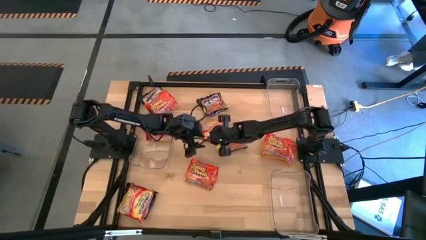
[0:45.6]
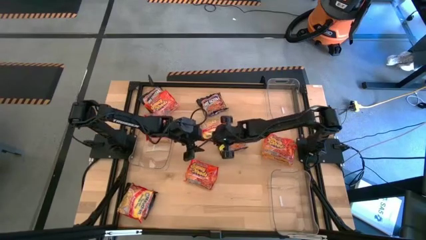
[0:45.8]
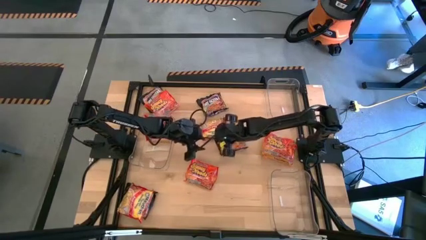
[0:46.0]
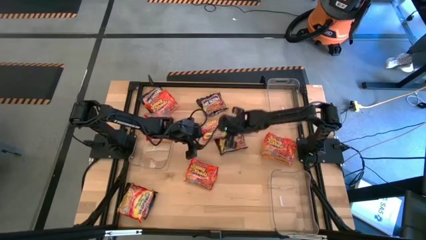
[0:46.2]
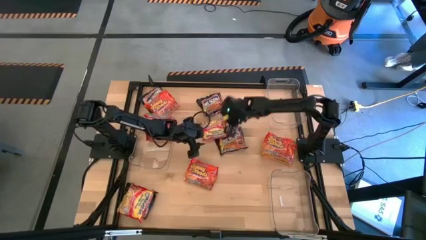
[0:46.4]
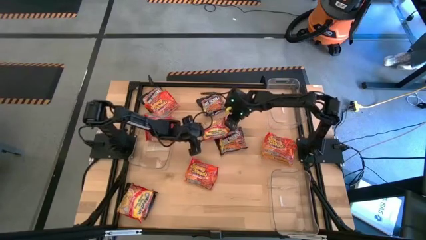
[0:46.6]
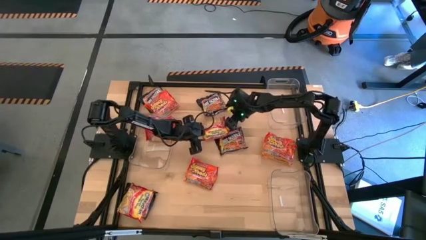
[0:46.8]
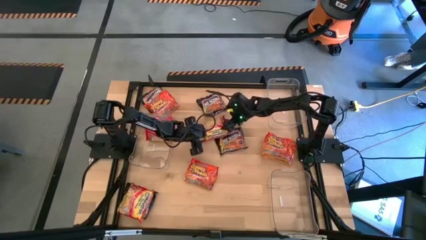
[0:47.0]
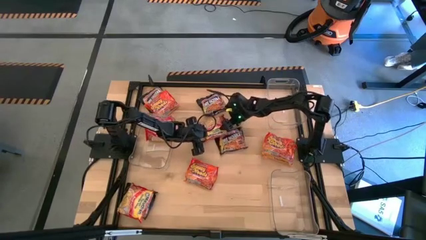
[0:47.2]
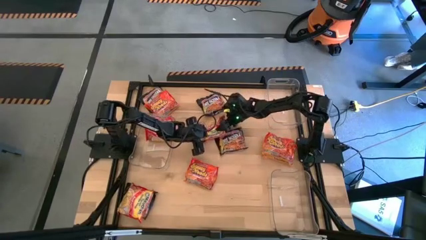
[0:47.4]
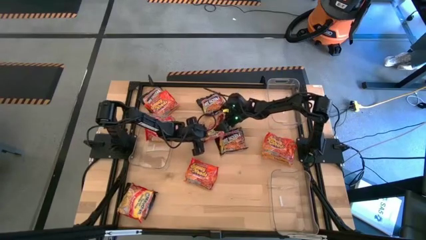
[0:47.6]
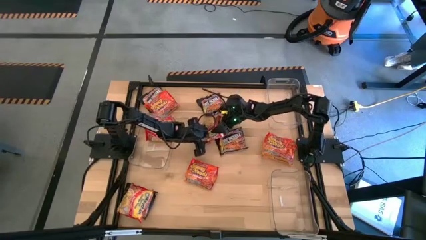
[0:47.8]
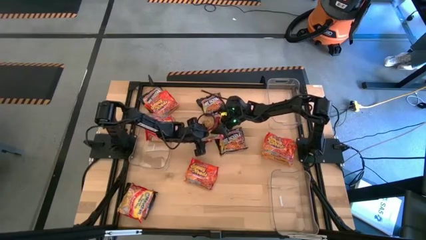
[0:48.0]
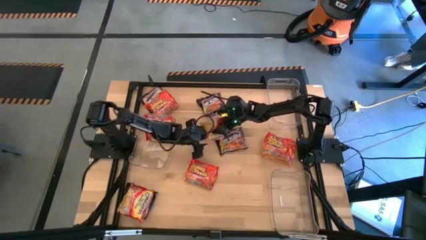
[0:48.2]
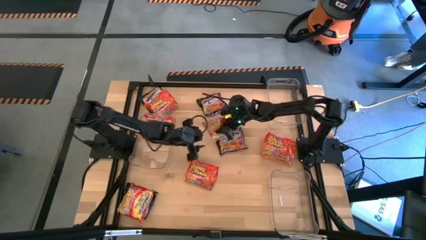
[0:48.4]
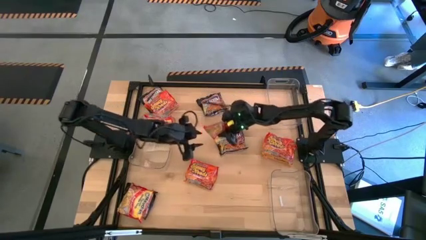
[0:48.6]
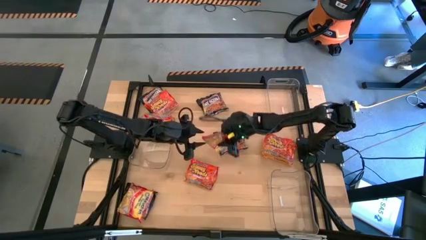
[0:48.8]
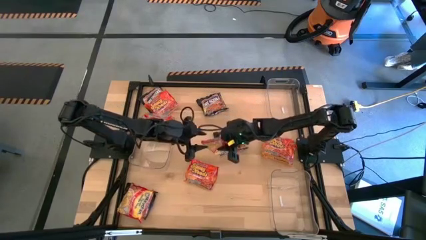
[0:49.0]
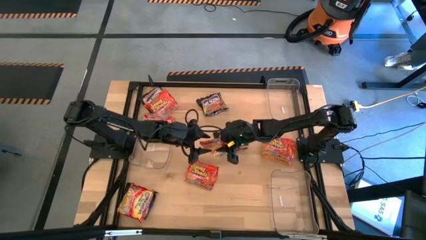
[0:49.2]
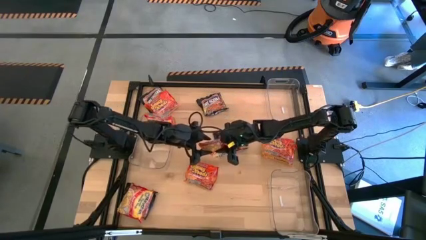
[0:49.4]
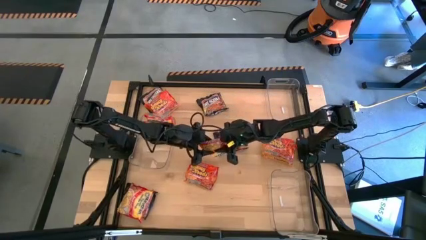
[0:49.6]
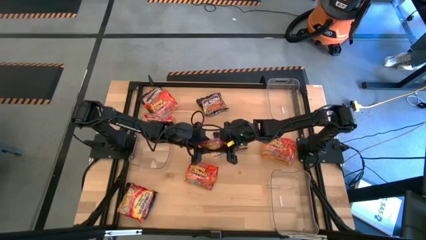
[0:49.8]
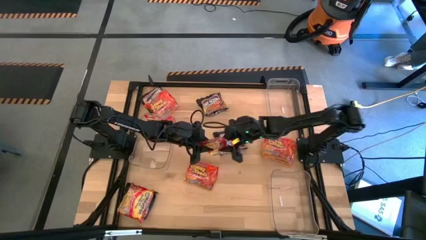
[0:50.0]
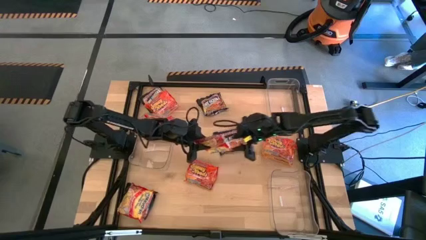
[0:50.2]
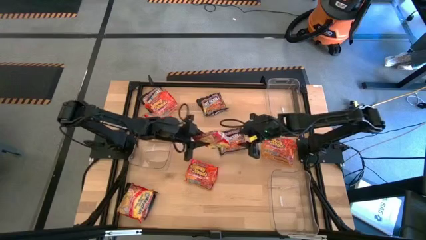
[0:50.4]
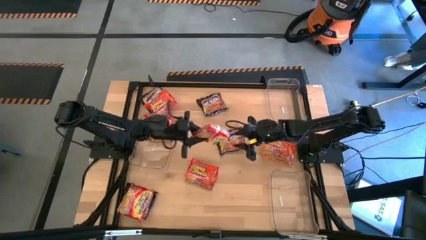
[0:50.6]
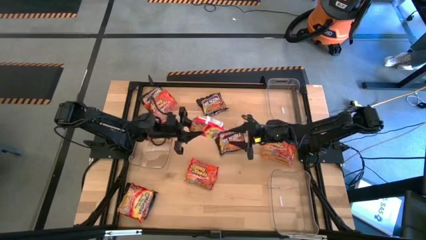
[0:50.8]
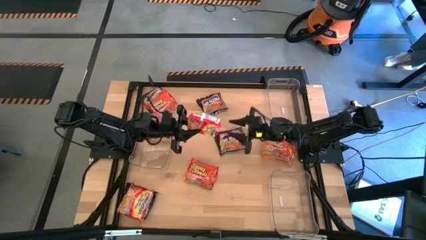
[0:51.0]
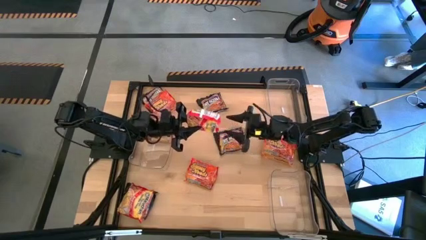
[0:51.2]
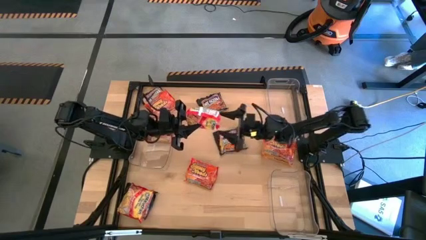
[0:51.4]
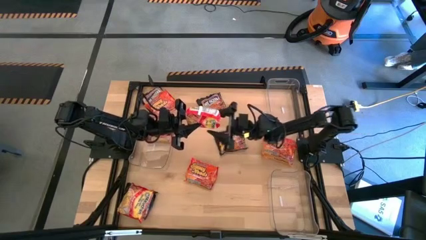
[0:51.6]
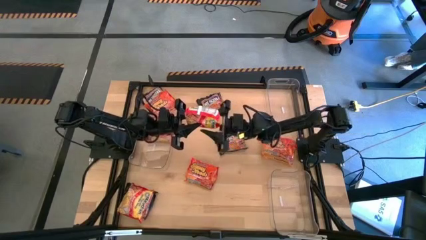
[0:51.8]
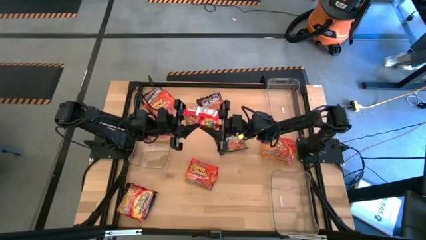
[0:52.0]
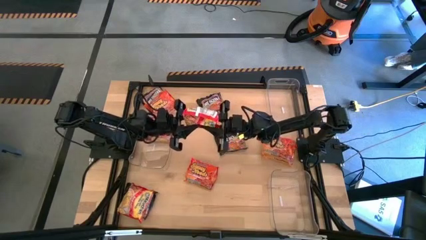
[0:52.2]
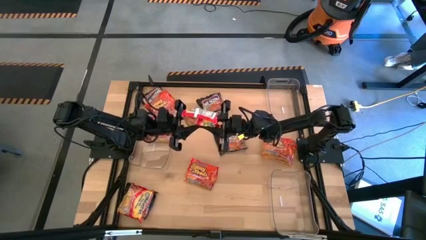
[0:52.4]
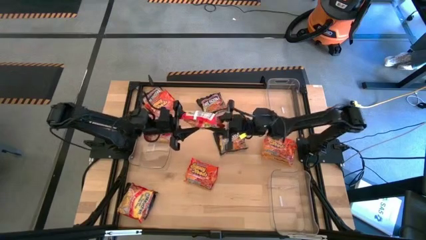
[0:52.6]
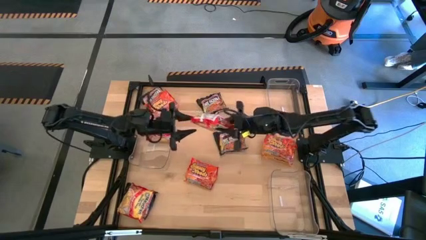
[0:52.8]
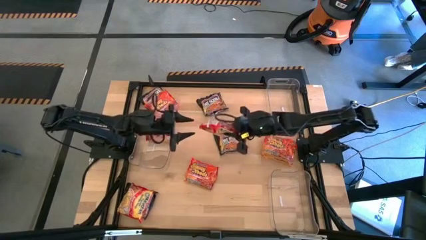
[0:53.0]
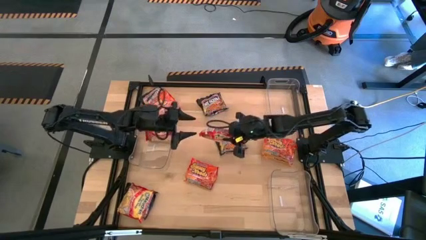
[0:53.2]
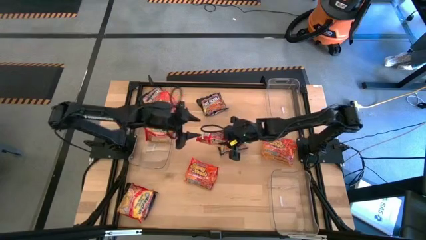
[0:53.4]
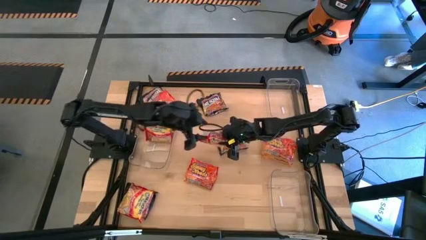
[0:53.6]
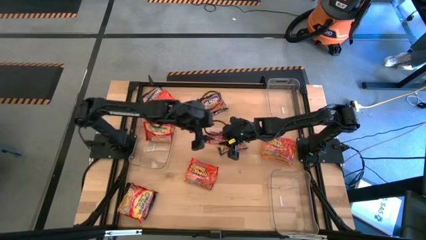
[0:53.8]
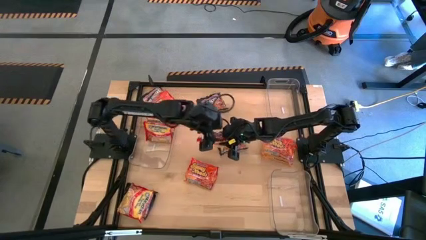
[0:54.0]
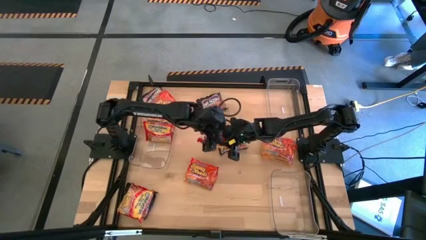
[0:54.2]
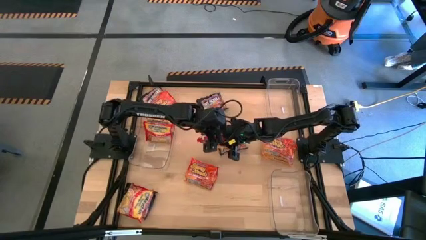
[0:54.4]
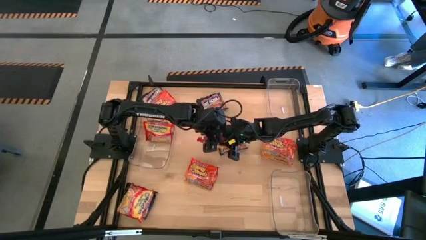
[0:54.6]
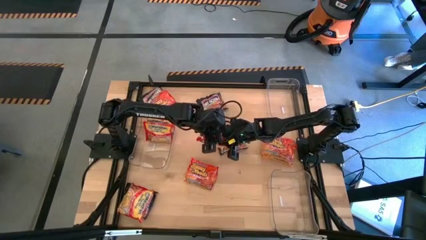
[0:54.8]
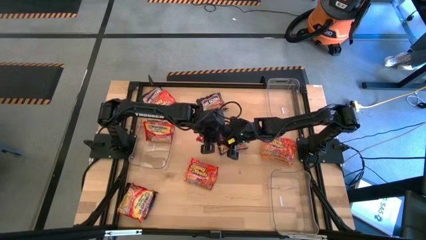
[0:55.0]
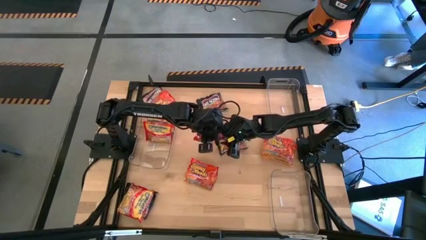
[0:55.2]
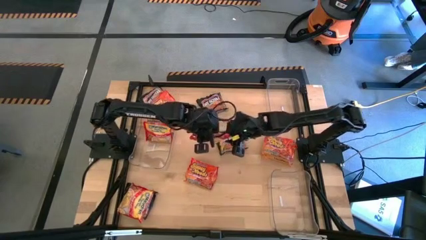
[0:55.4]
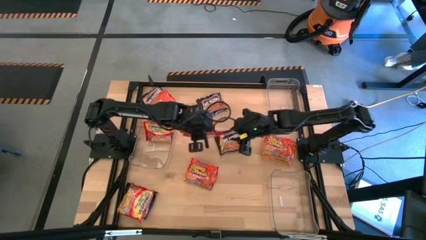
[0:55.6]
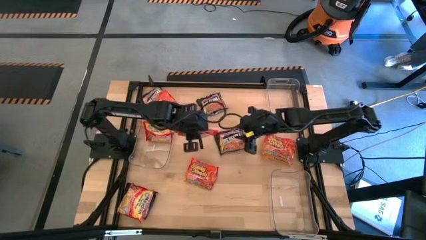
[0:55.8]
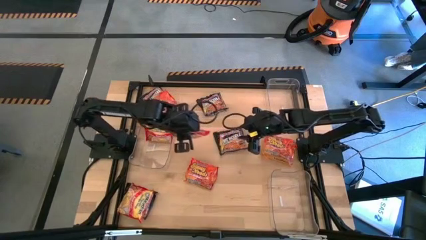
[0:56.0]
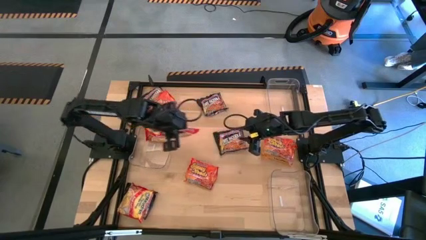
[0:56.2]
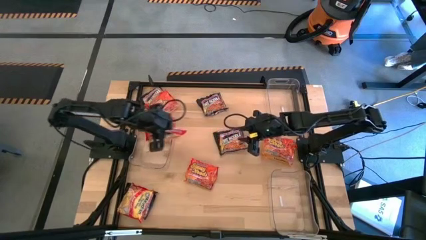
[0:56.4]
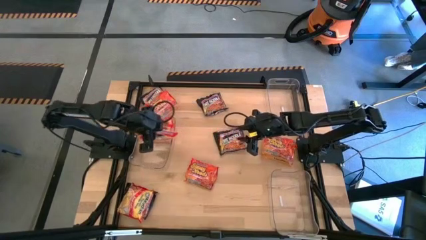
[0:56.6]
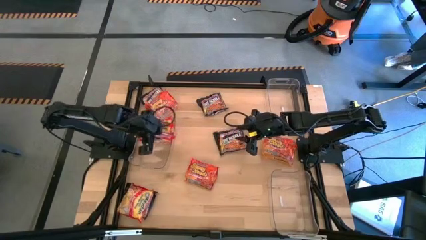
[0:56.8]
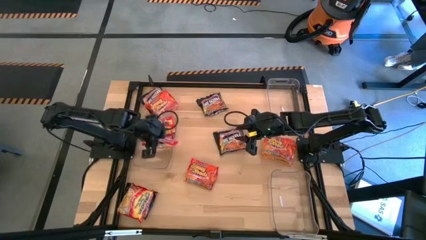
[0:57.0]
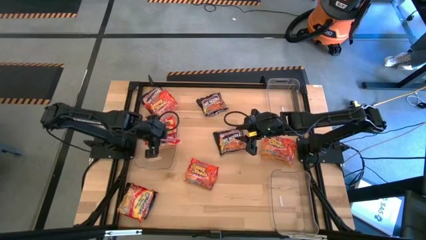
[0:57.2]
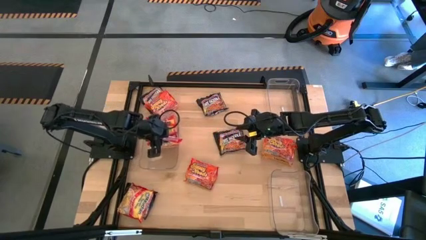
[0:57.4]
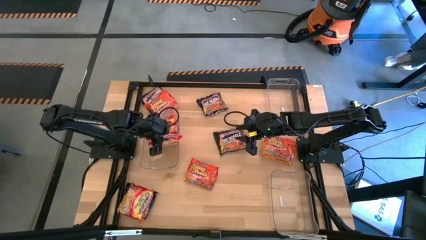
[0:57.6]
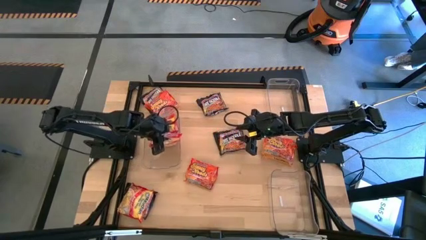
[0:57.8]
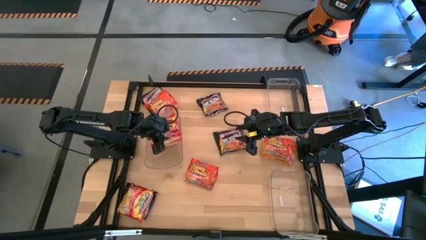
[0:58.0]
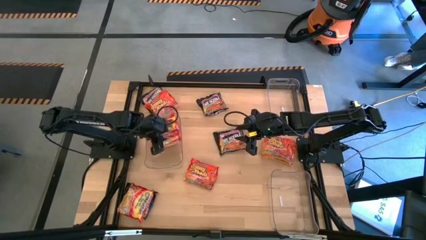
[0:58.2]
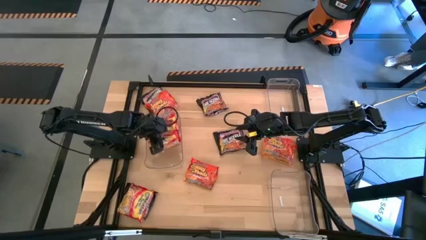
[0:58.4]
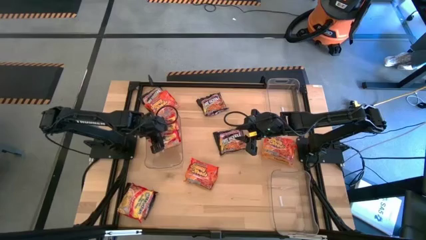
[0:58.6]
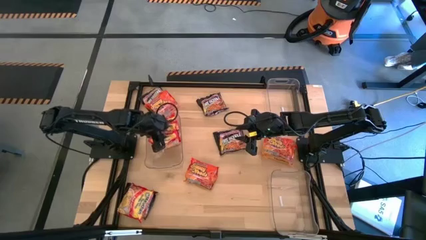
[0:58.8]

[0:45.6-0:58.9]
Task: Sort Maruchan noodles
Put the red noodle pack into the middle transparent bin
